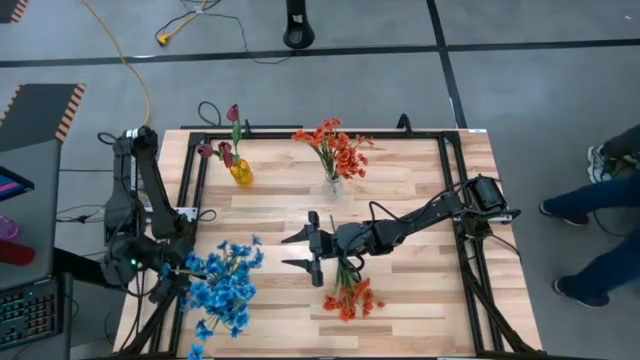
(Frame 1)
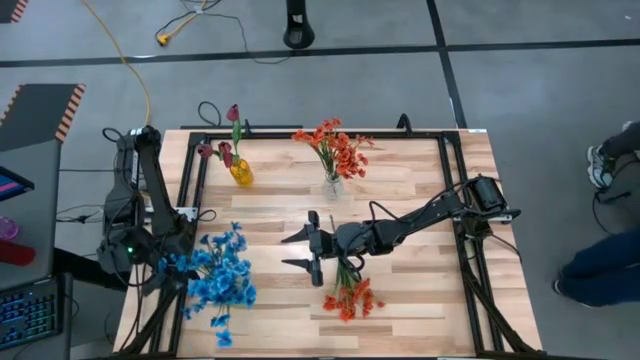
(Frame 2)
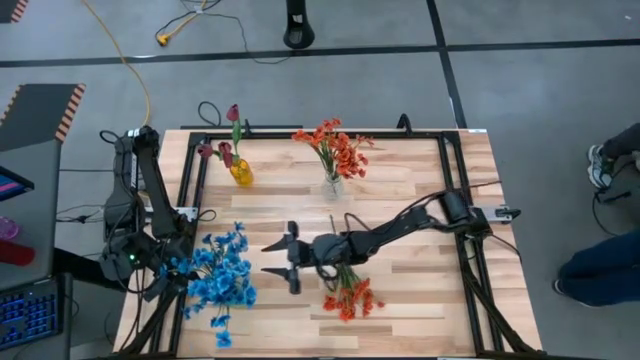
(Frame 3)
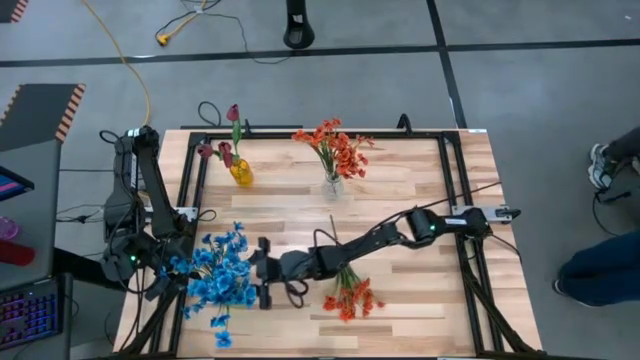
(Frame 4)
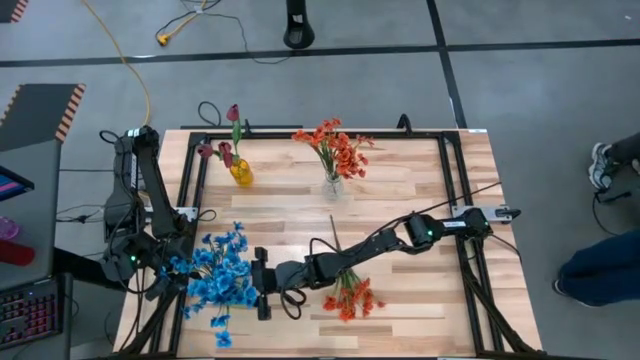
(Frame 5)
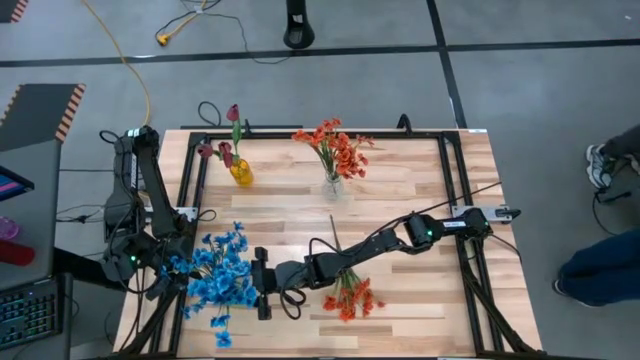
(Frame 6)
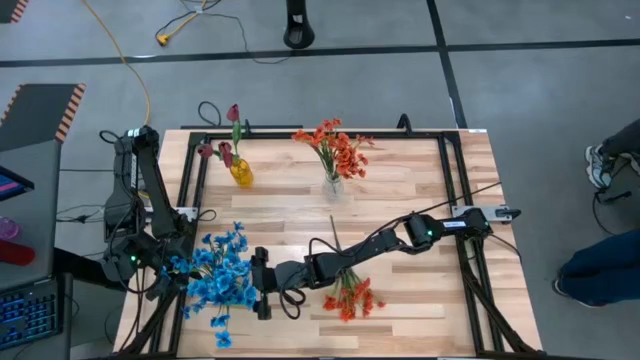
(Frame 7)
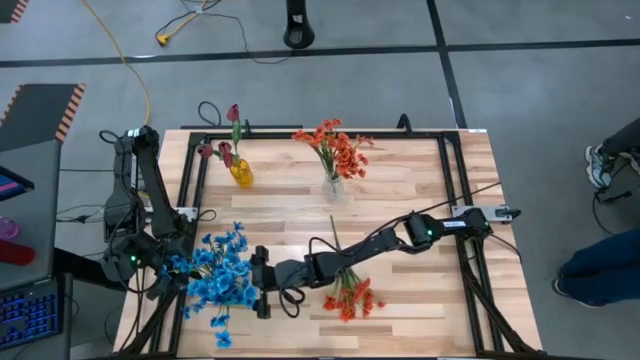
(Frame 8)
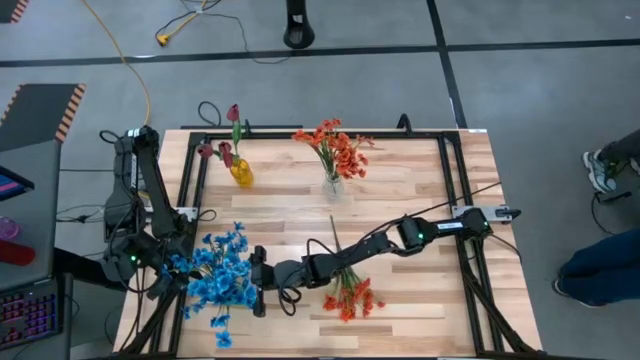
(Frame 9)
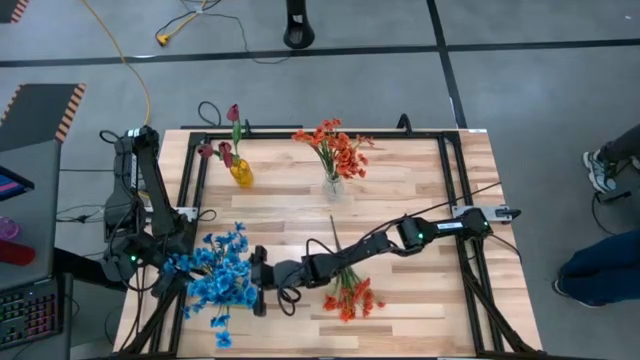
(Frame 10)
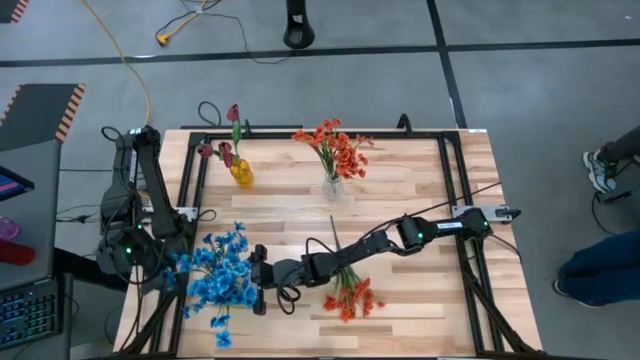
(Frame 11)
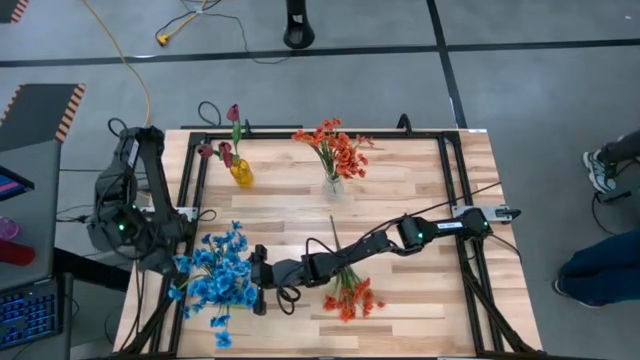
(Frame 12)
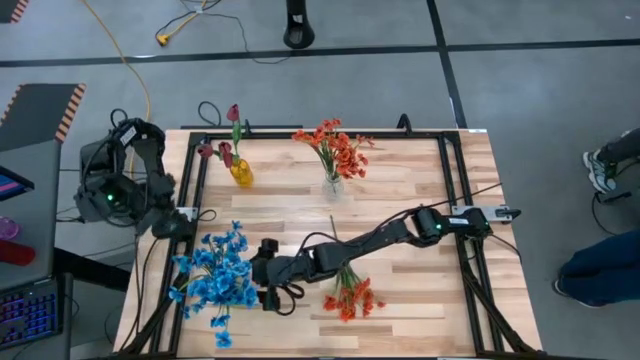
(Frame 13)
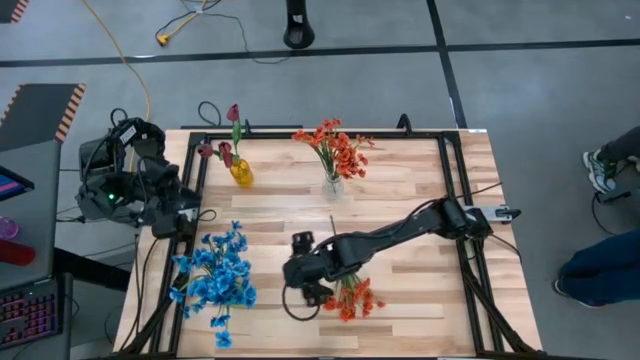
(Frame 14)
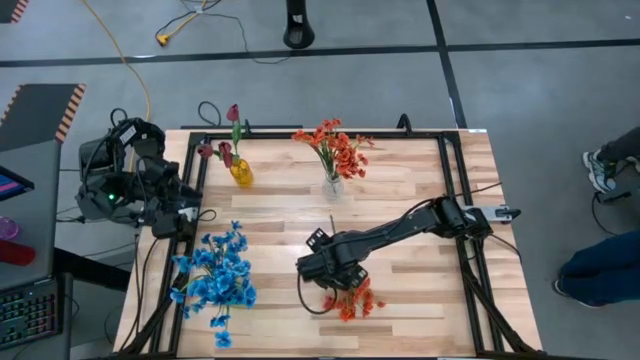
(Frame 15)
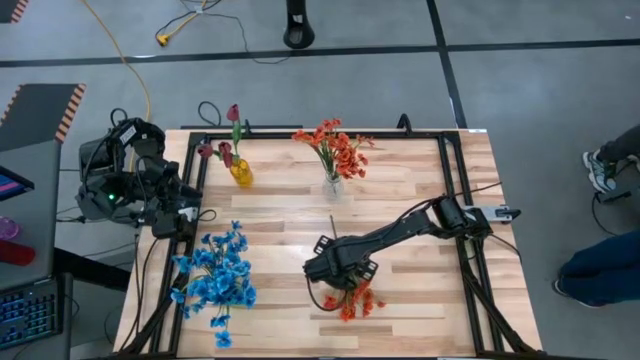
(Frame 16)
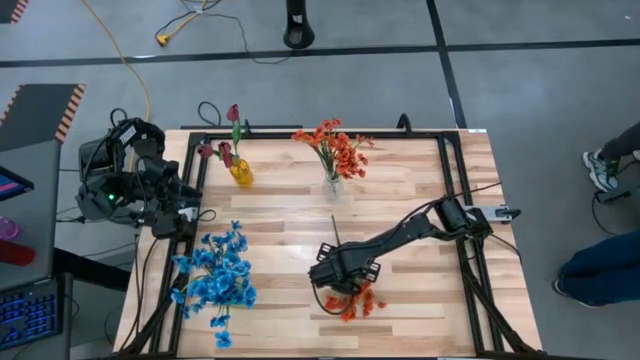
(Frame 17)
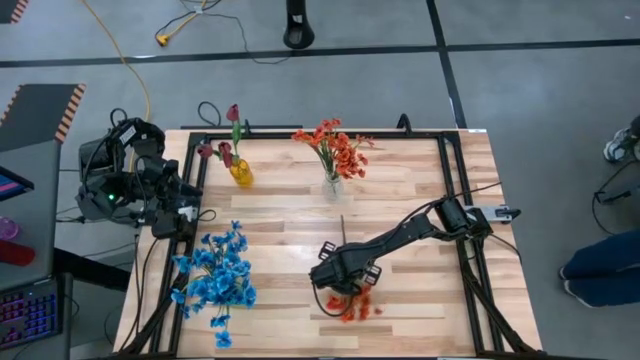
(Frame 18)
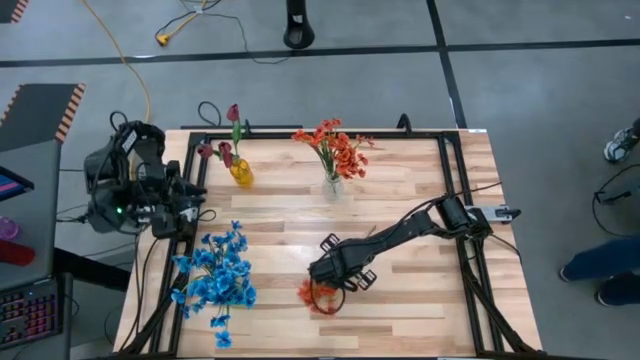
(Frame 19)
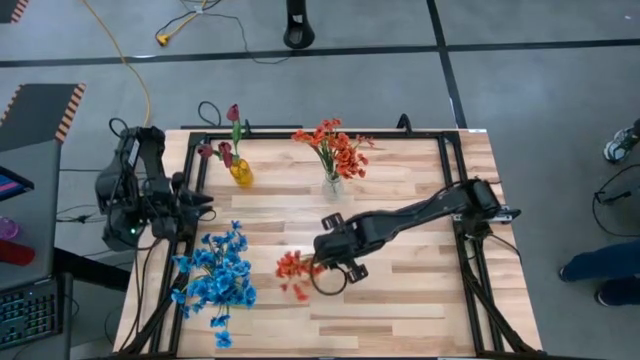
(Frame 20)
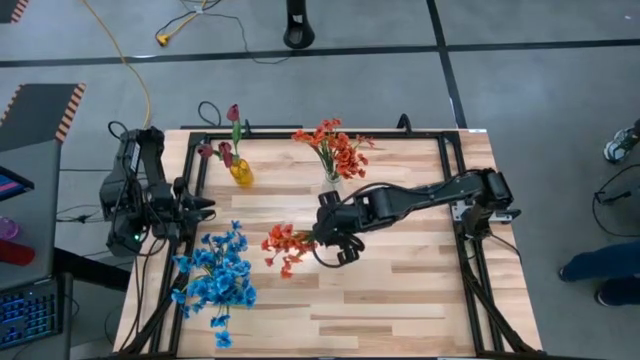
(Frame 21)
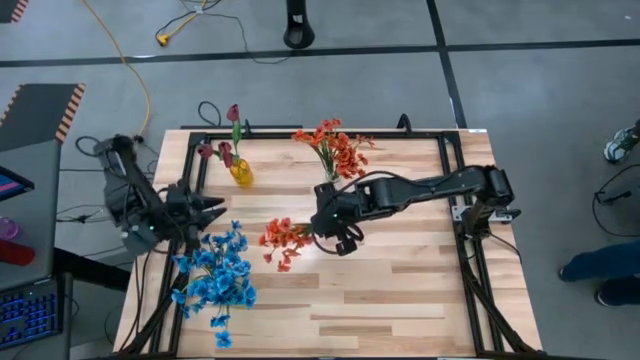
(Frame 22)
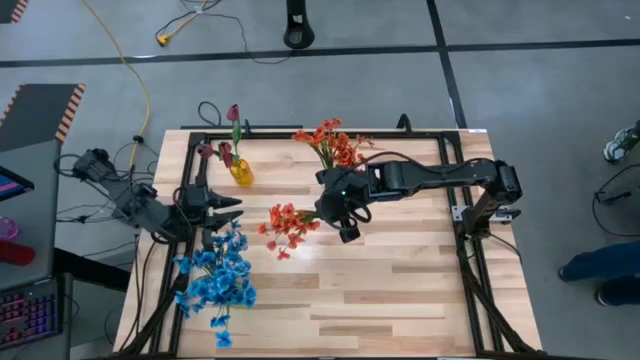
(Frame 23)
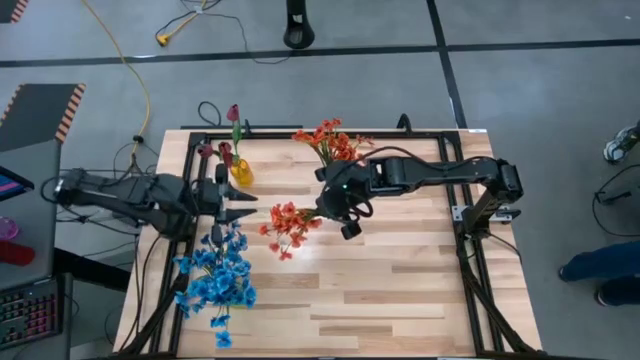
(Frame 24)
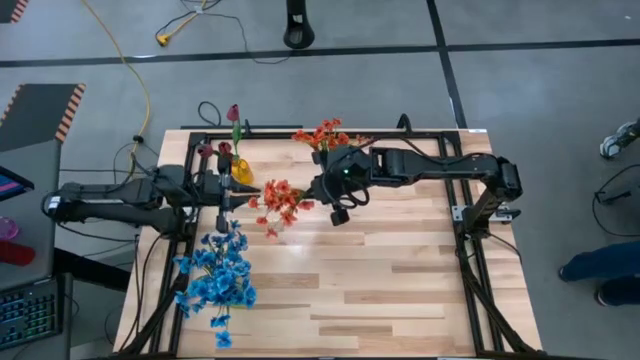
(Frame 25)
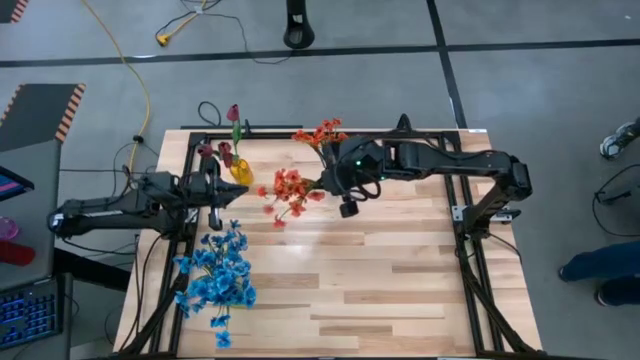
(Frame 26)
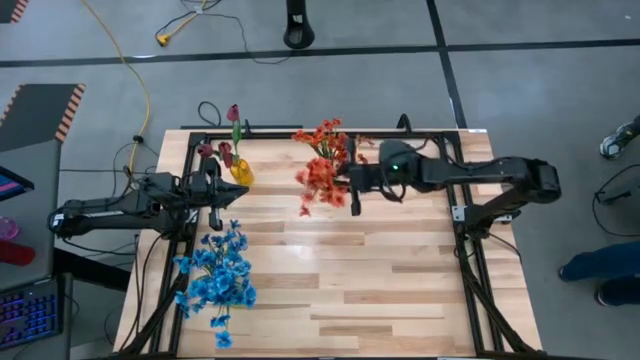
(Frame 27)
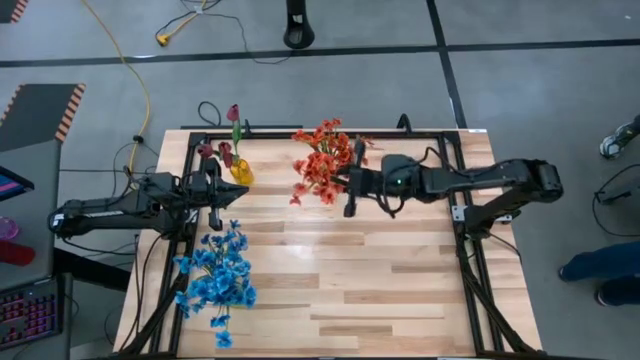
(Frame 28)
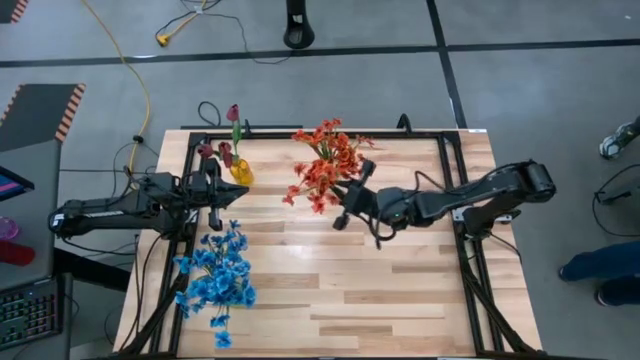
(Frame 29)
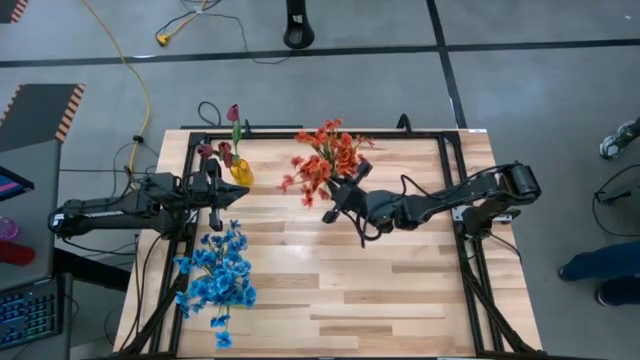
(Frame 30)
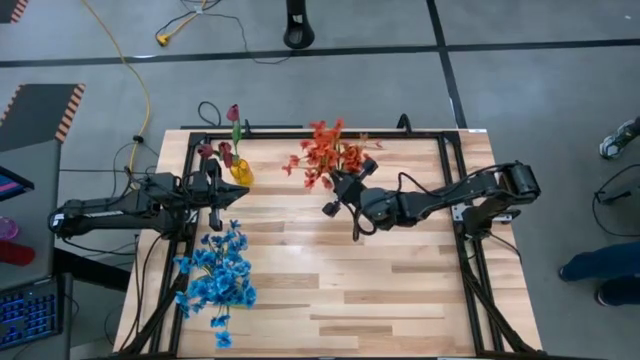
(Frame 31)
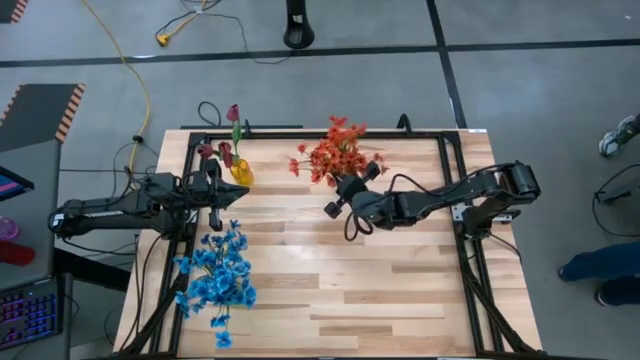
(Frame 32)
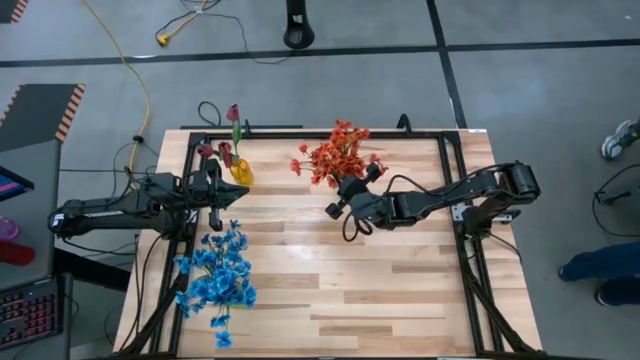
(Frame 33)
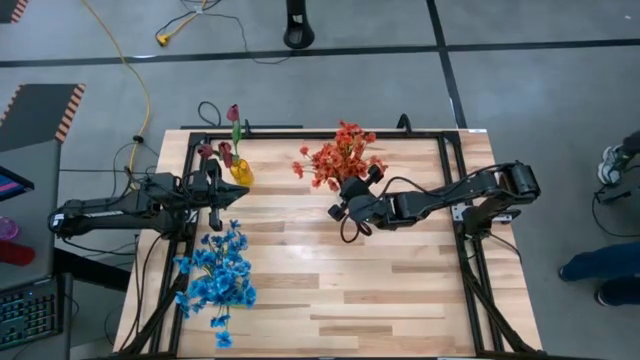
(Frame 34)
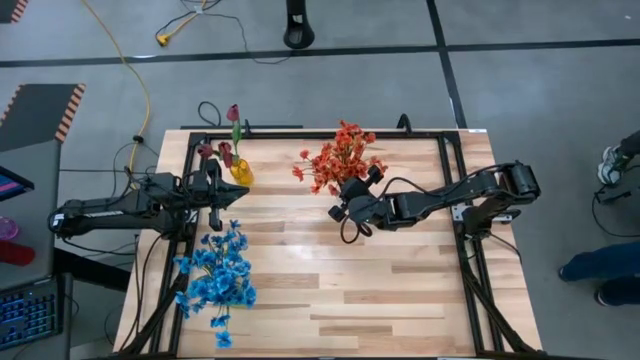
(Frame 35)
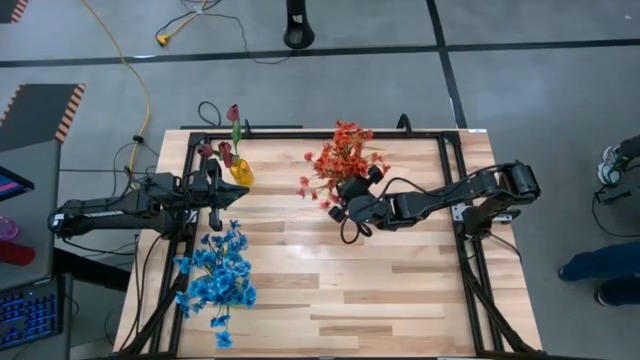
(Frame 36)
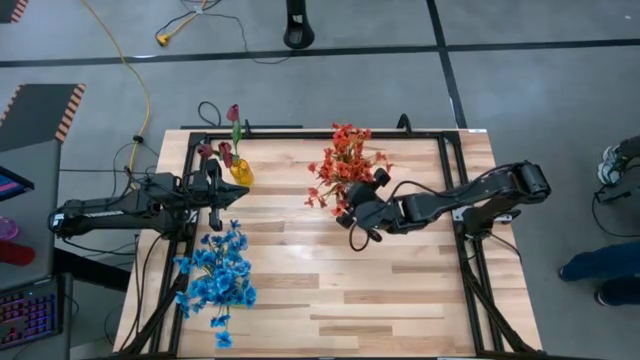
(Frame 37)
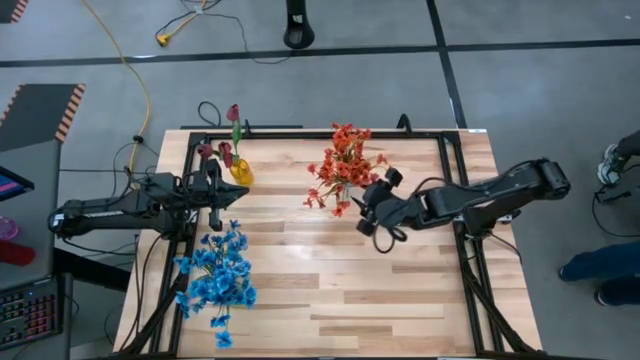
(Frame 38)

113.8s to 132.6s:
Task: Sort flowers into vase by color
Put the orange flowers into the transparent vase

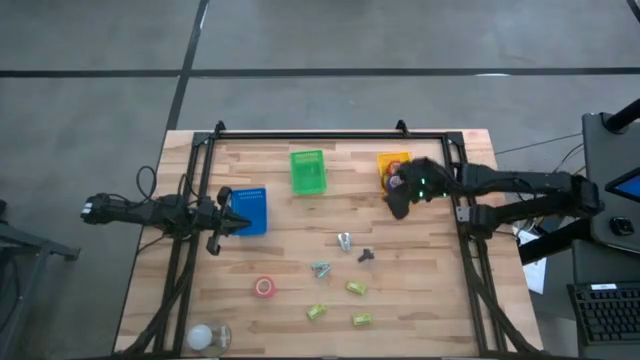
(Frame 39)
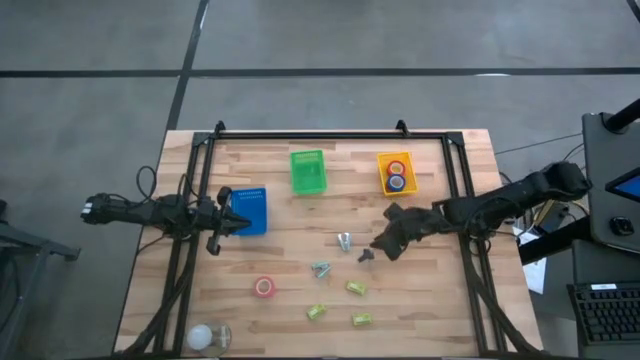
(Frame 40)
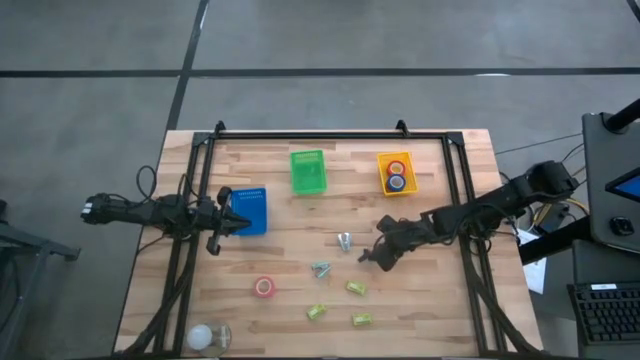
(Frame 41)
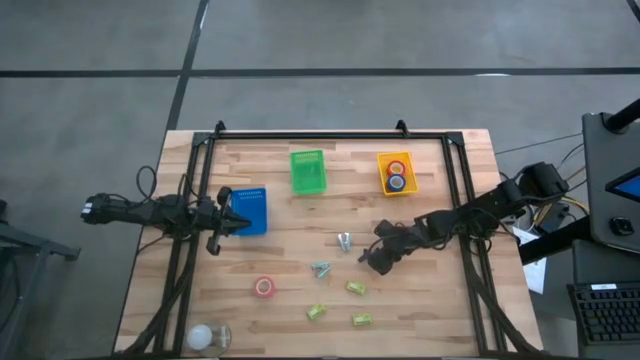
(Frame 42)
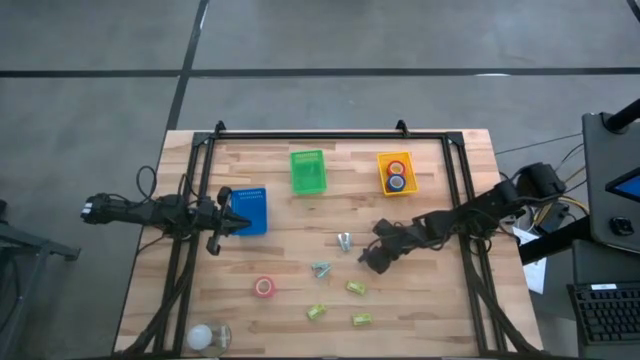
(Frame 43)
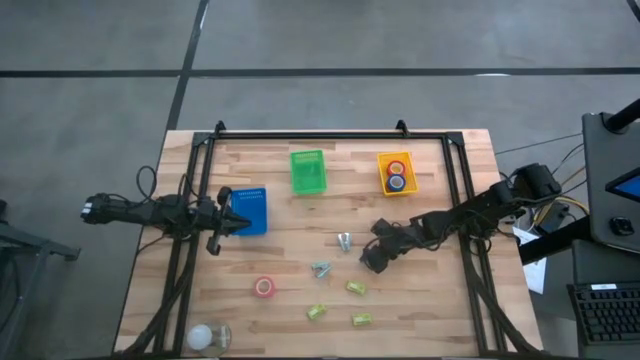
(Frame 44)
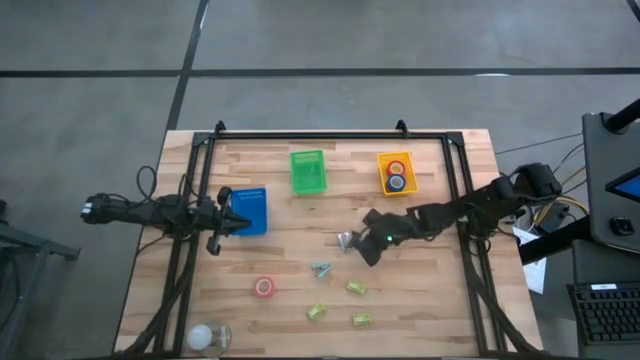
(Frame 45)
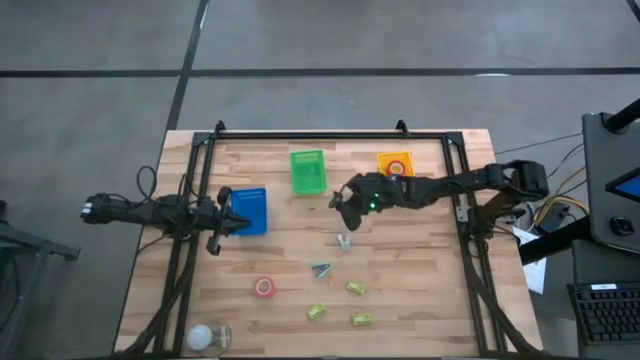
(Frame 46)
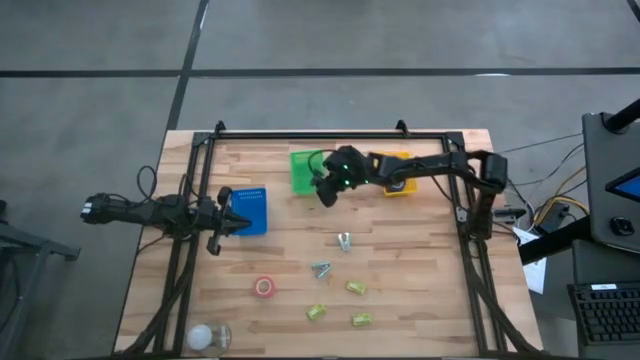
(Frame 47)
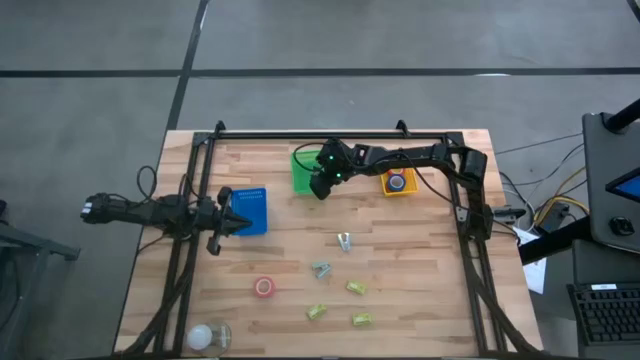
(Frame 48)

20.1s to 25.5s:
Task: Pick and place Stapler, Stapler remover, tape
Put the black staple remover into the green bin
